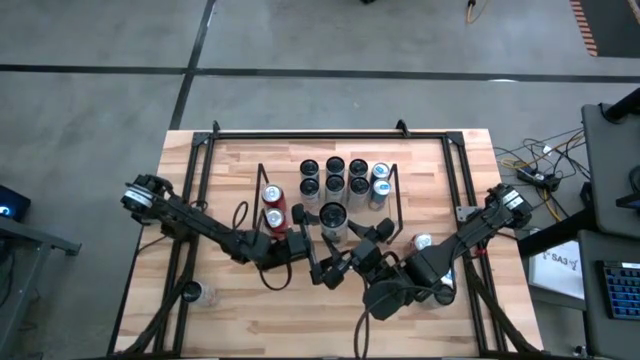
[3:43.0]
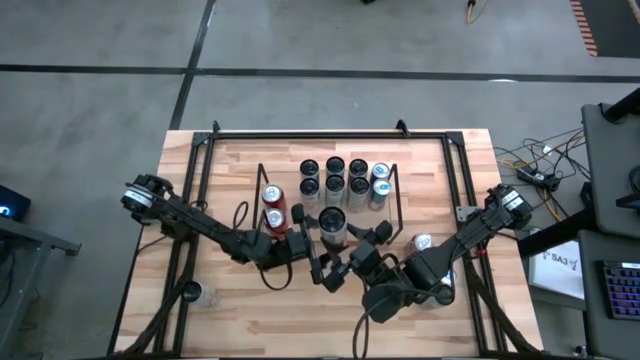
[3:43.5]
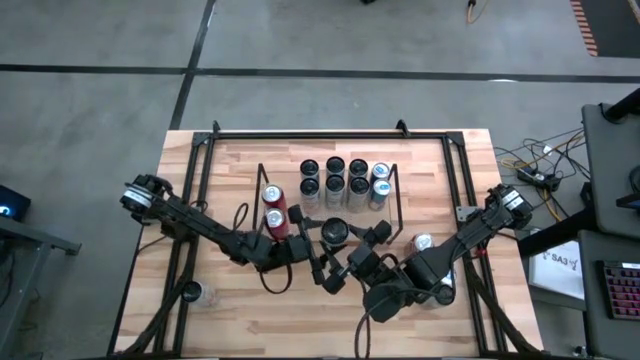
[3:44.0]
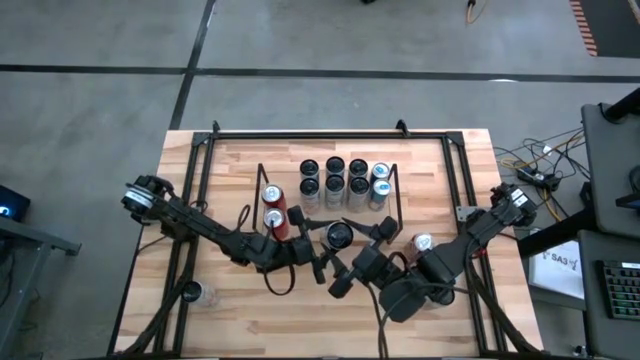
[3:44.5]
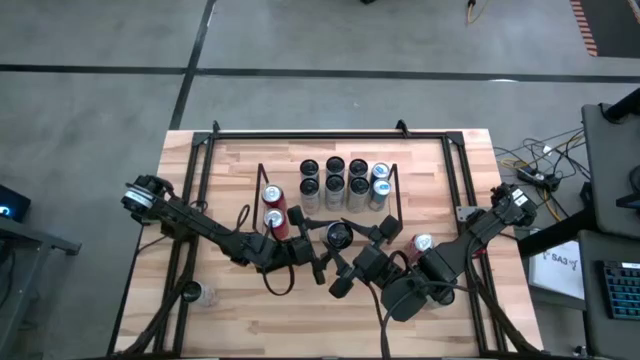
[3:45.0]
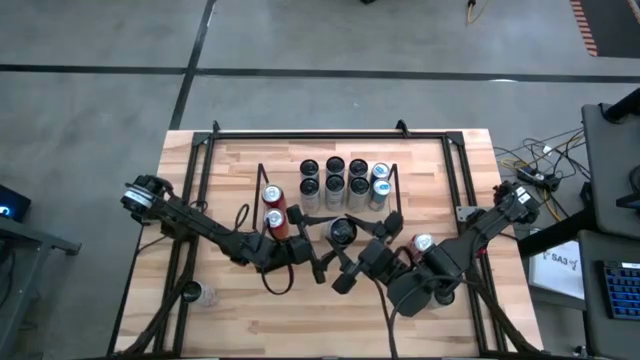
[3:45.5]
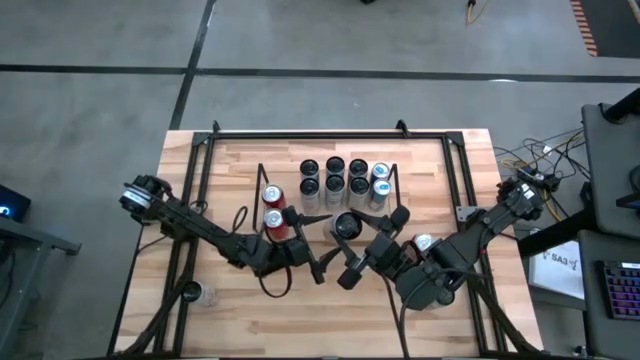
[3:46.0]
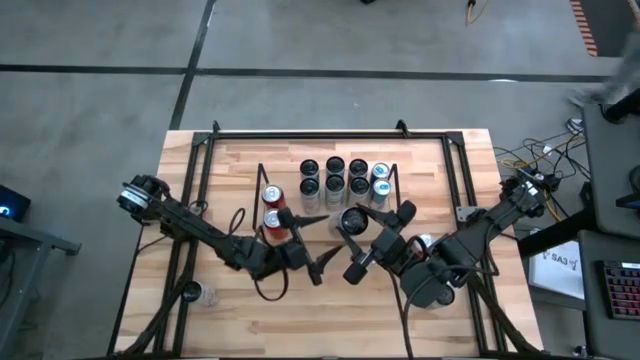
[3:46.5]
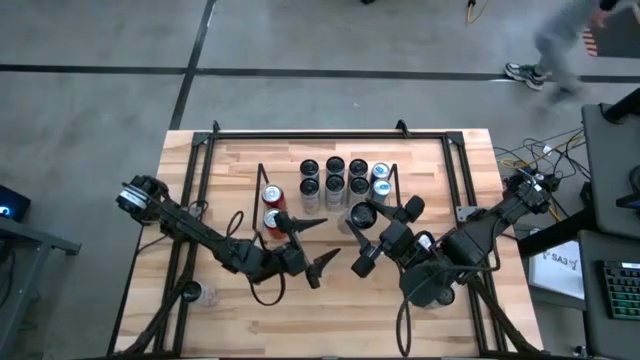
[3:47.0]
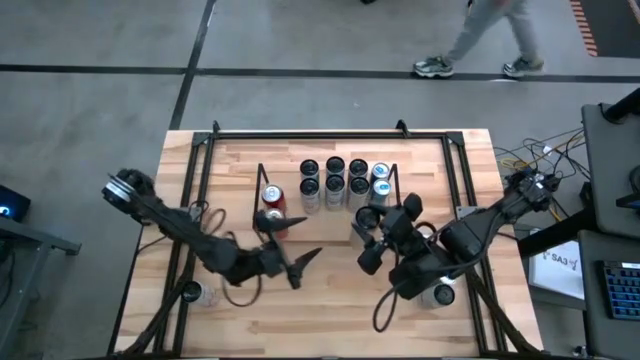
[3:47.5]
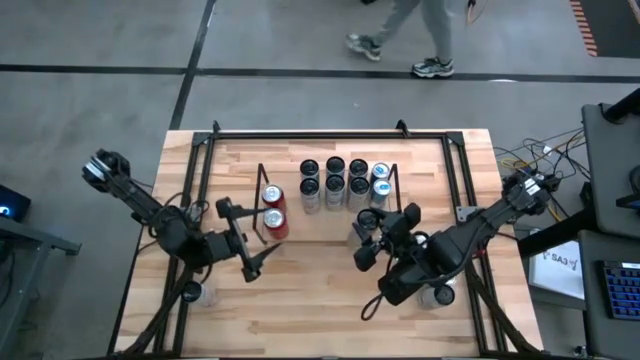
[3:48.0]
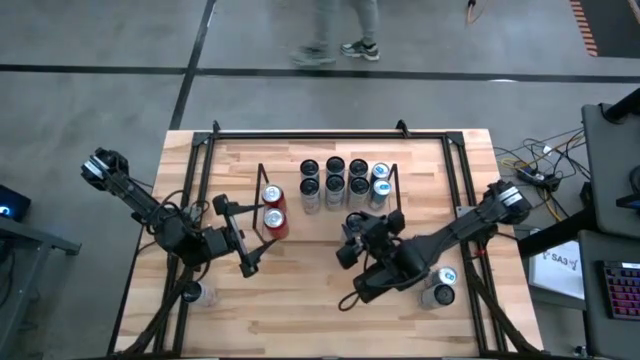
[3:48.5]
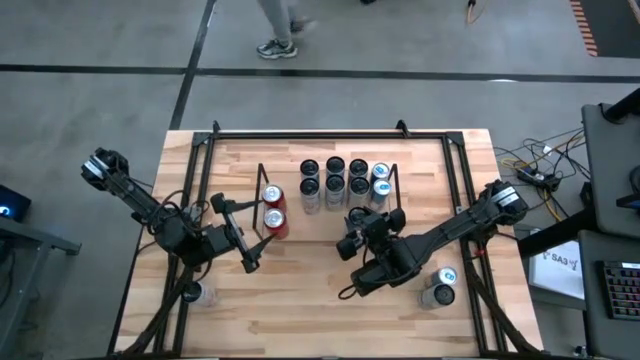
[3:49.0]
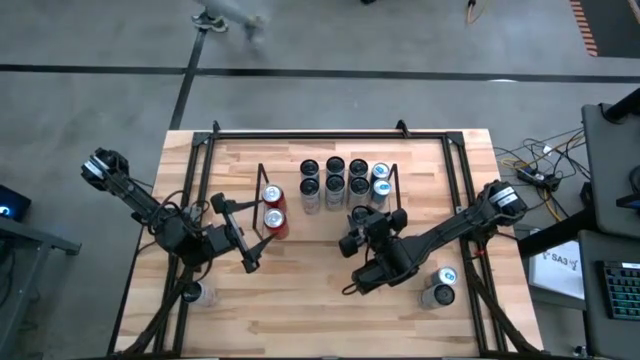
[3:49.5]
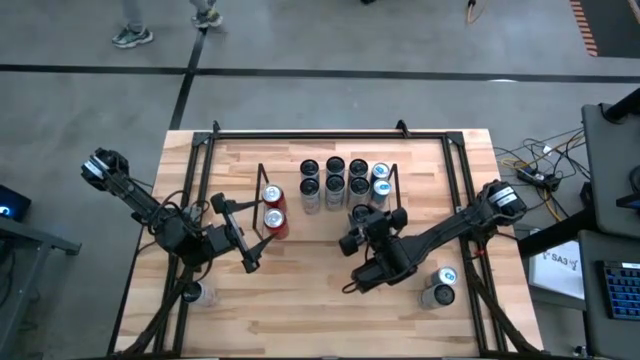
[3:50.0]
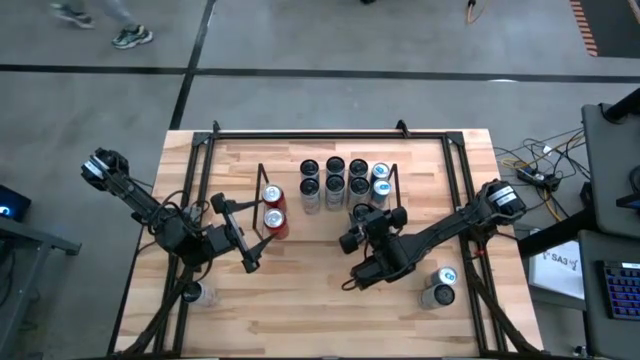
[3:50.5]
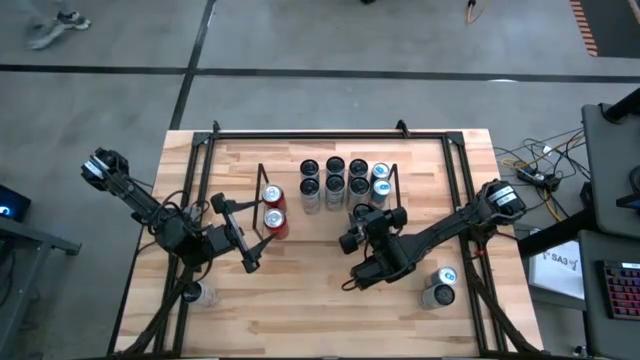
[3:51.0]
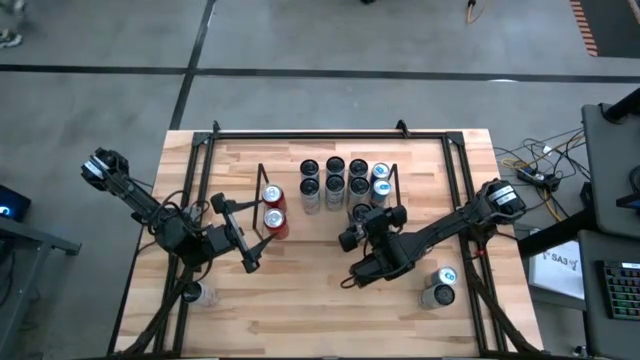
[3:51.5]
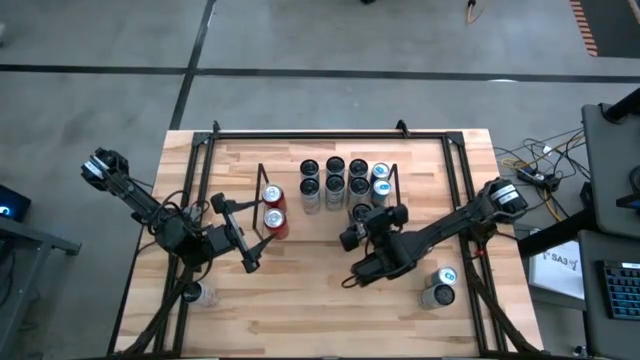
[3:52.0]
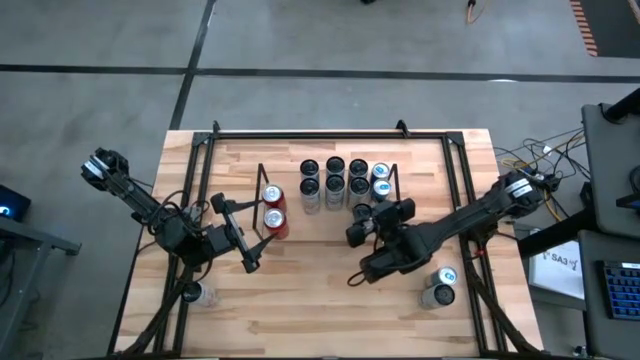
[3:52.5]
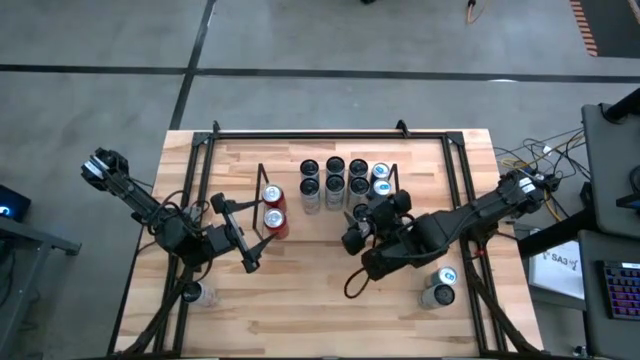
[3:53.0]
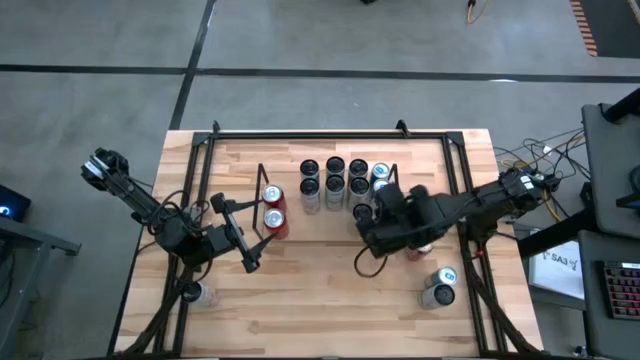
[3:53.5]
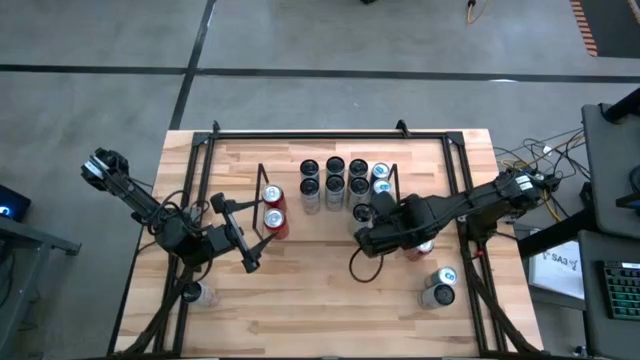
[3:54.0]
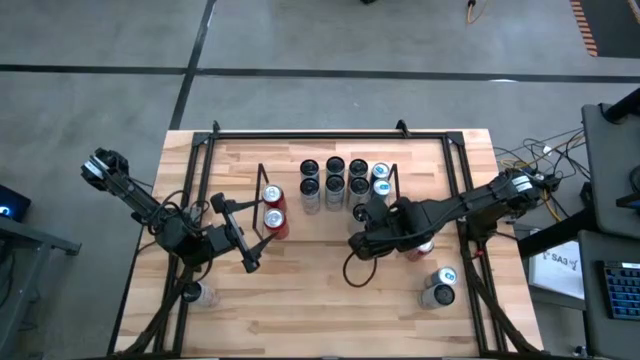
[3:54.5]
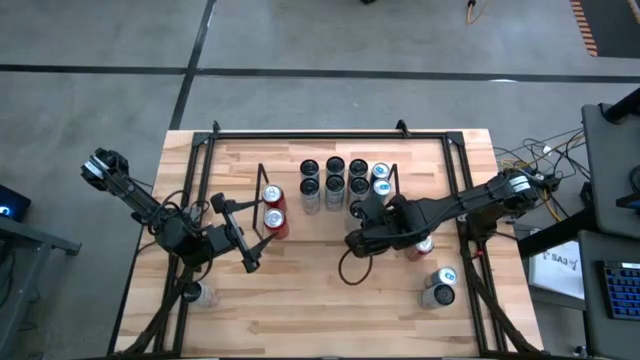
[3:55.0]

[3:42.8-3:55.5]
Task: Place canned beverage on shelf
Put the white and yellow soda can on the shelf aligned with the other white and yellow soda can

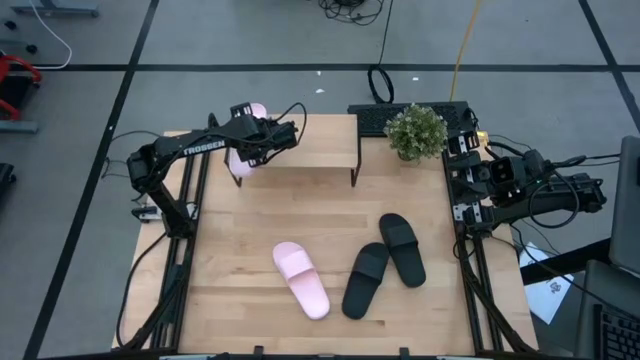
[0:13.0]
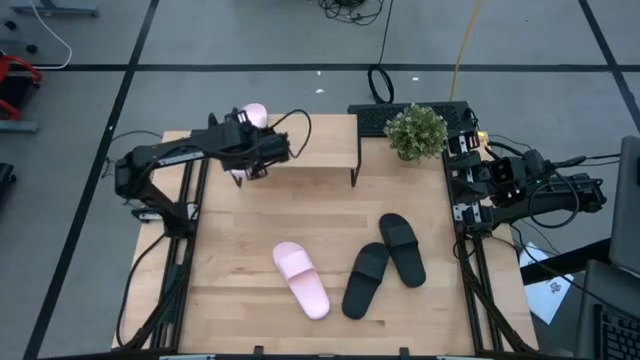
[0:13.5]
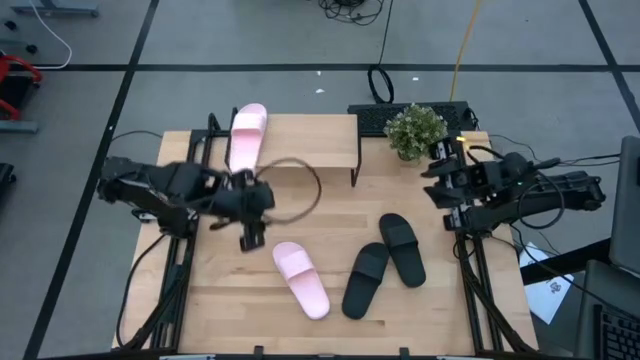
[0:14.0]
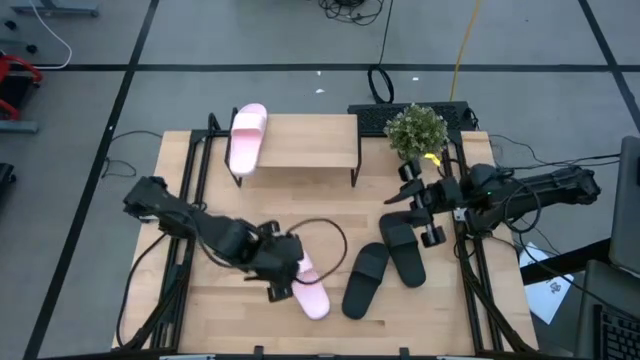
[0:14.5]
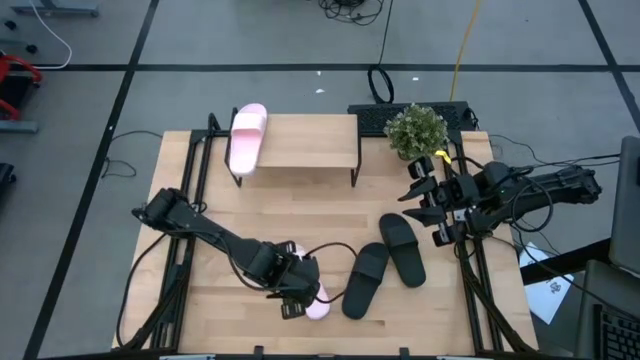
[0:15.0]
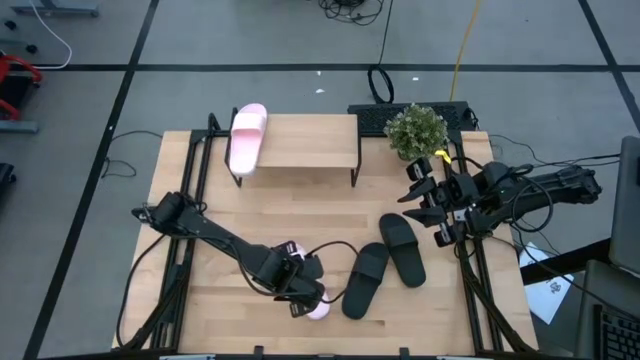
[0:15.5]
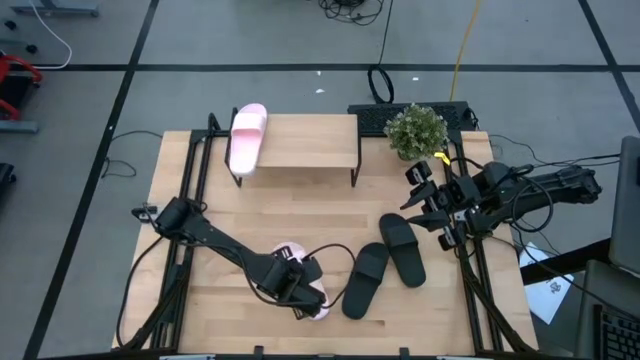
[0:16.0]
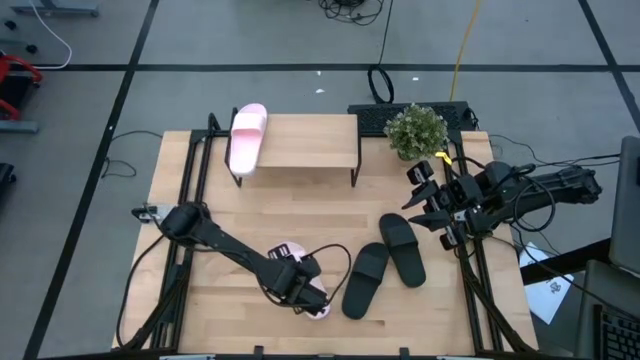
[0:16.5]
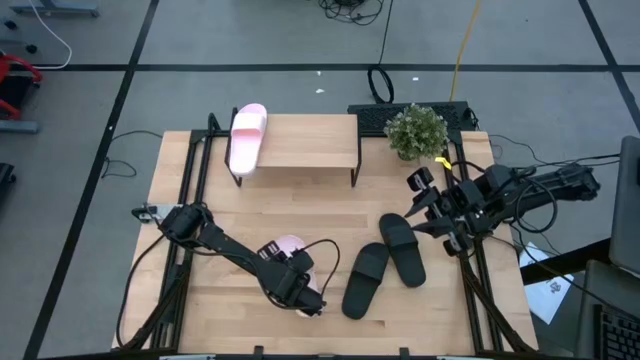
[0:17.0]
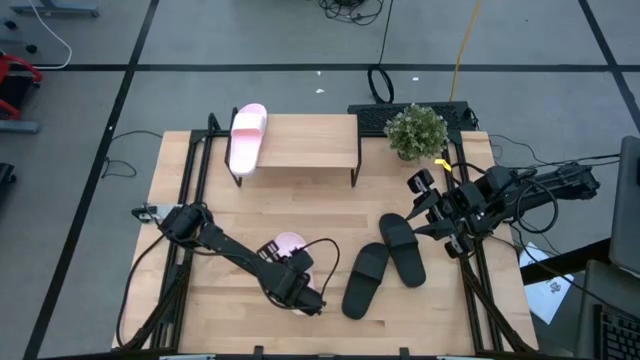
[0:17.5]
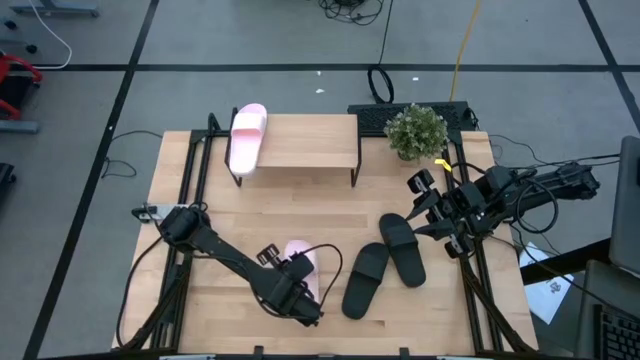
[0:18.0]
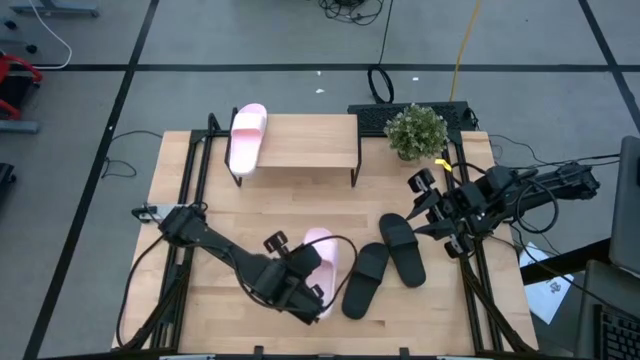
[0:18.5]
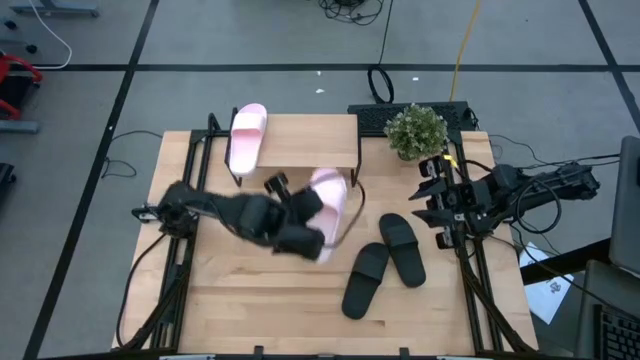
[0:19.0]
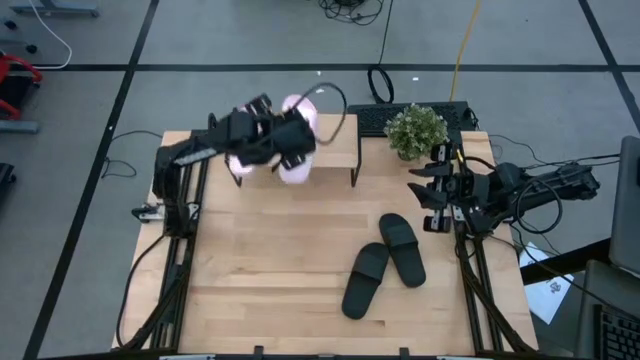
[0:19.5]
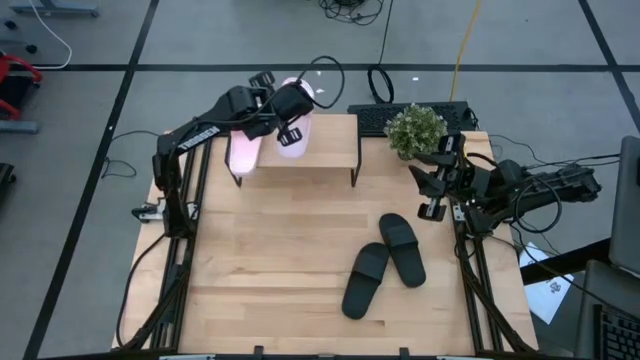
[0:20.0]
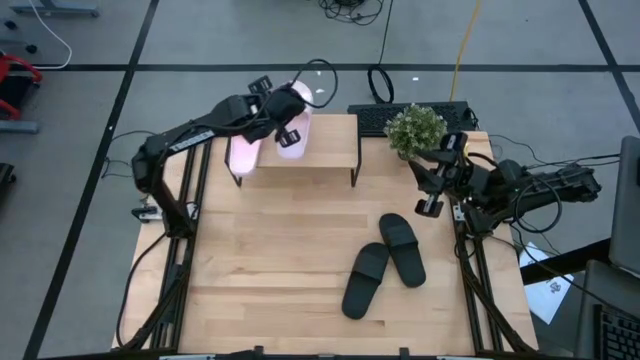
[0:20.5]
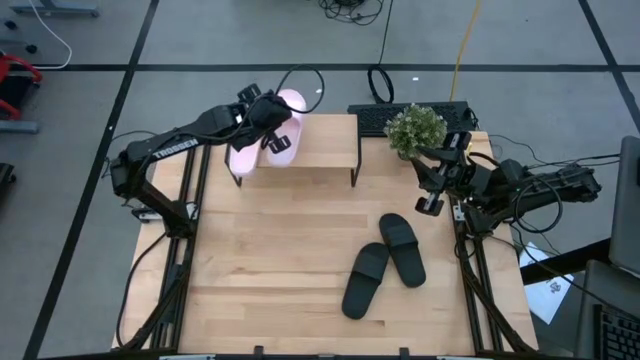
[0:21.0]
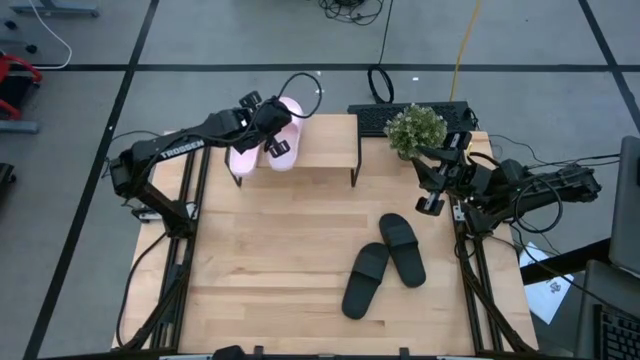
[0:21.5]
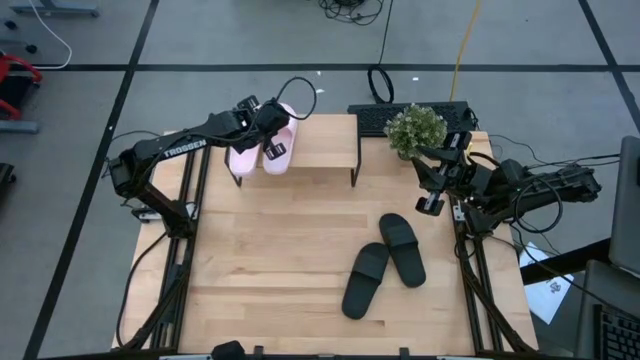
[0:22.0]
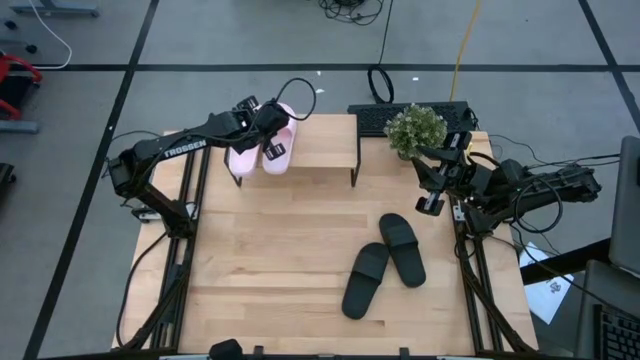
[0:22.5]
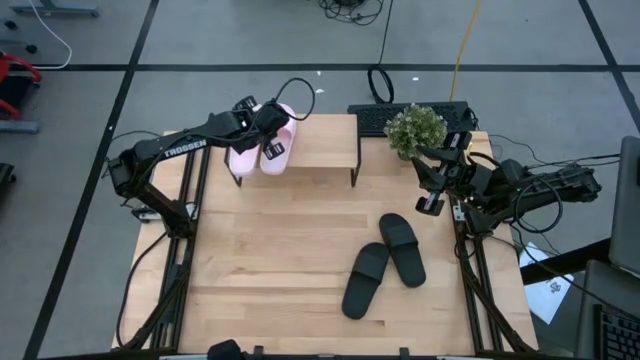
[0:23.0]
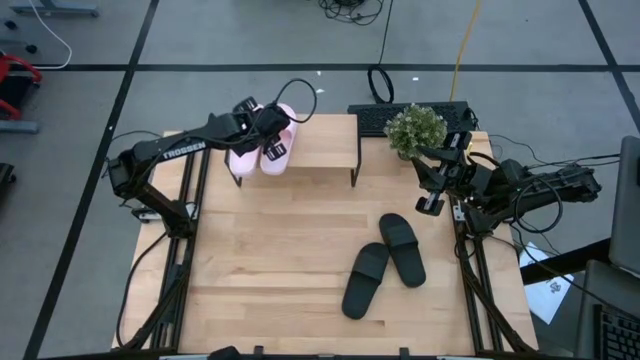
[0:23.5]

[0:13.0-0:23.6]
Task: Pick and place slides into the shelf
Put the pink slipper on the shelf
